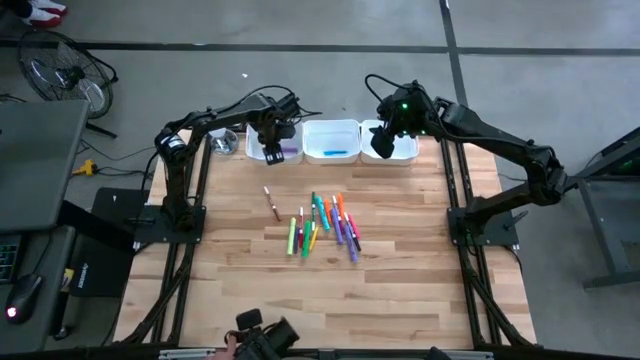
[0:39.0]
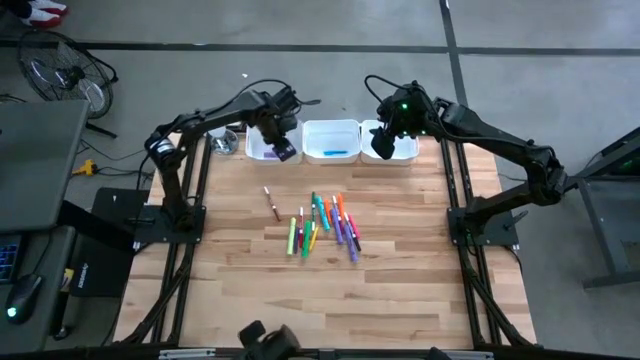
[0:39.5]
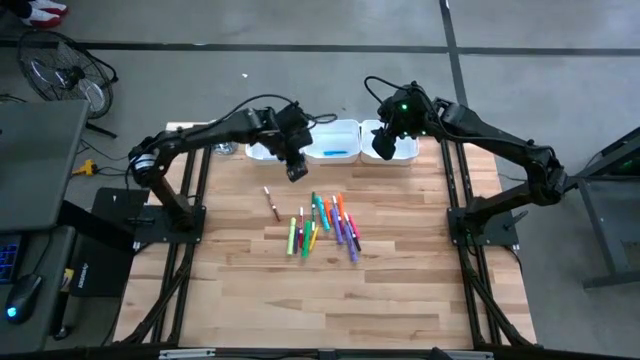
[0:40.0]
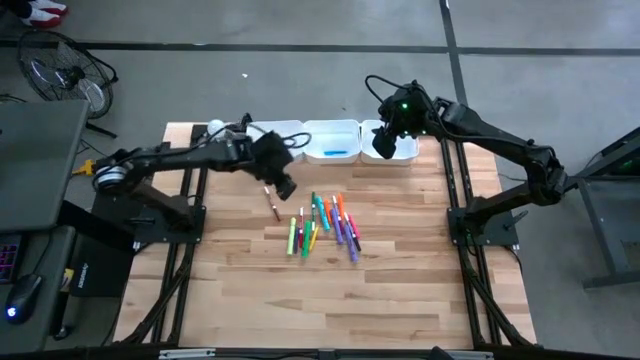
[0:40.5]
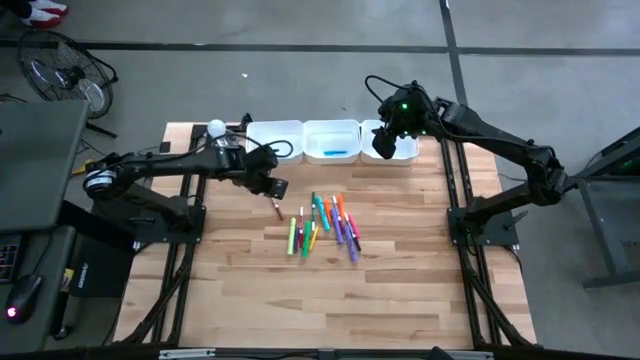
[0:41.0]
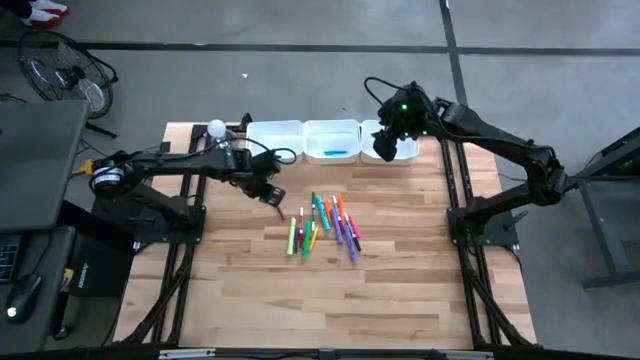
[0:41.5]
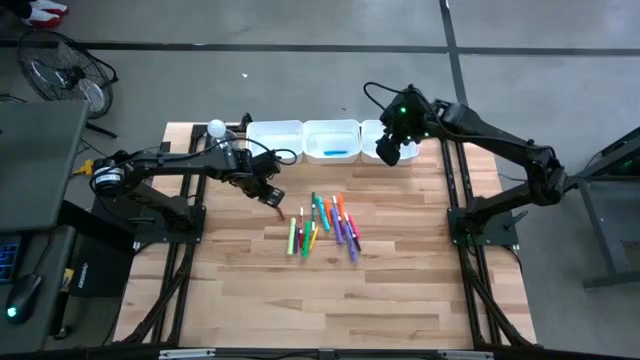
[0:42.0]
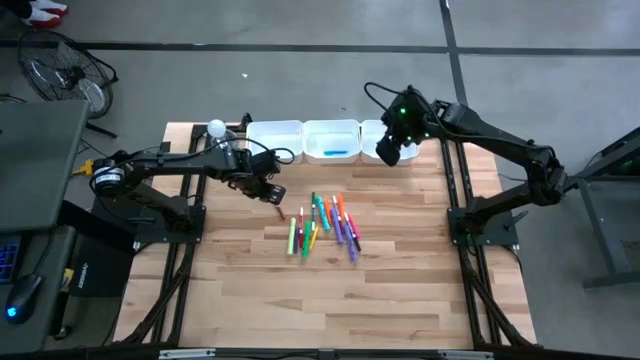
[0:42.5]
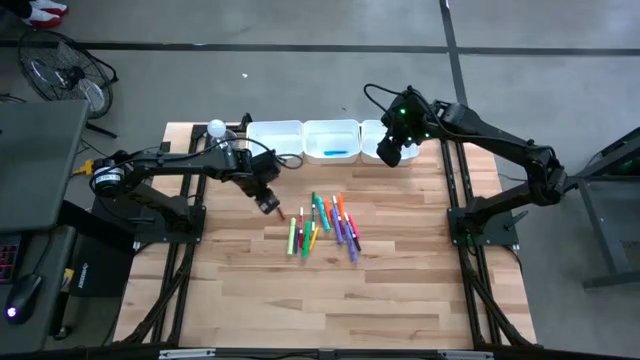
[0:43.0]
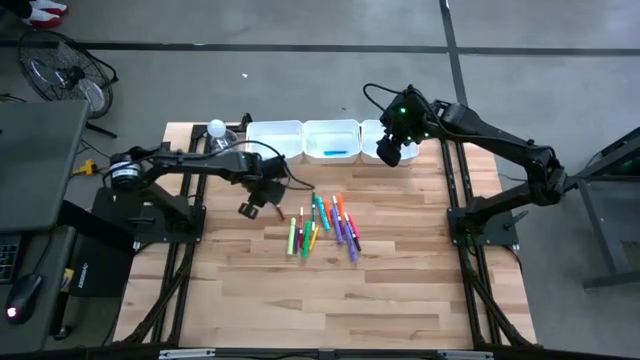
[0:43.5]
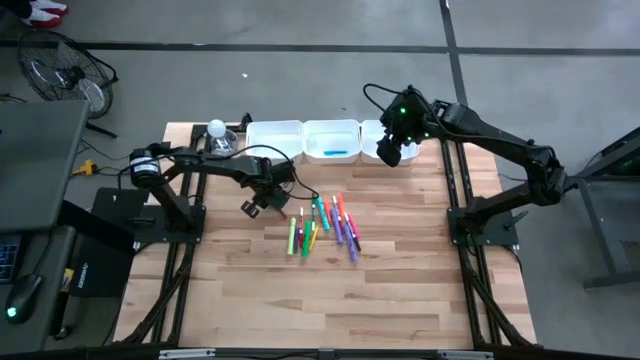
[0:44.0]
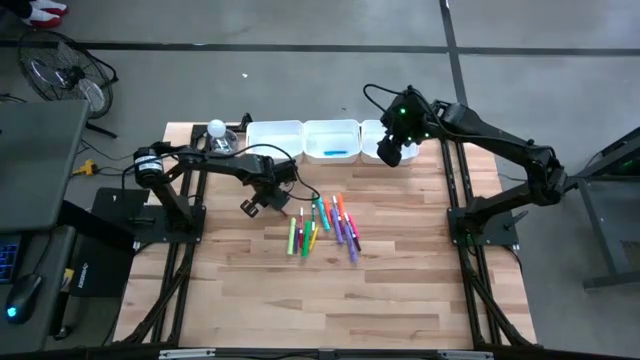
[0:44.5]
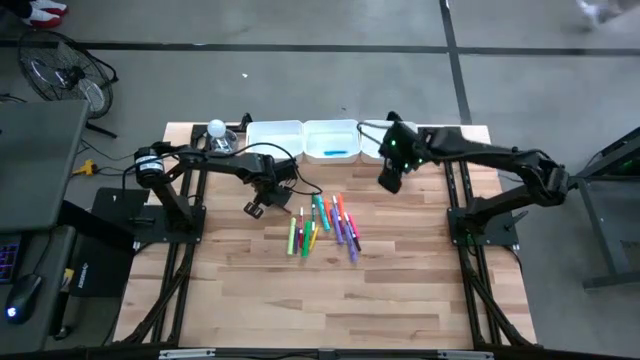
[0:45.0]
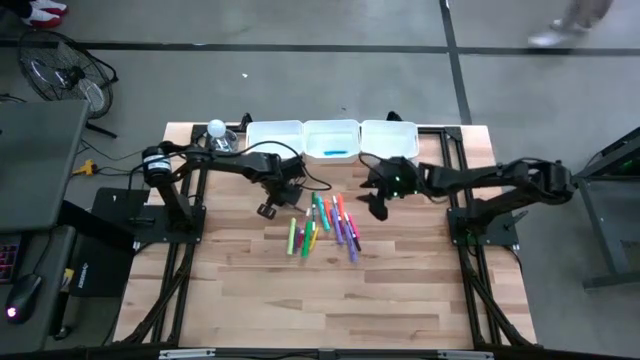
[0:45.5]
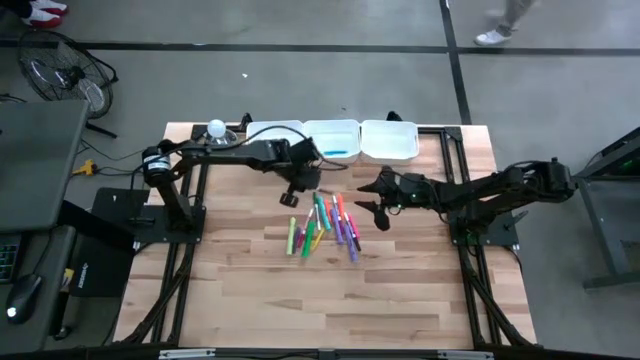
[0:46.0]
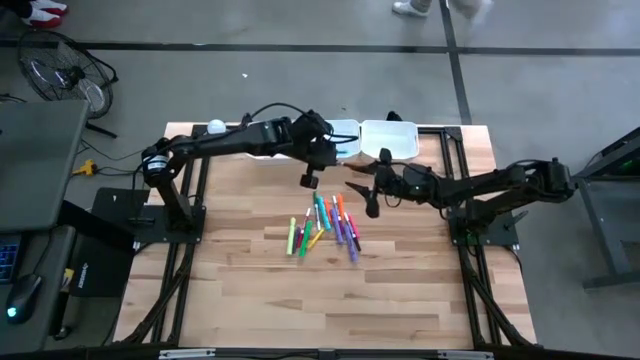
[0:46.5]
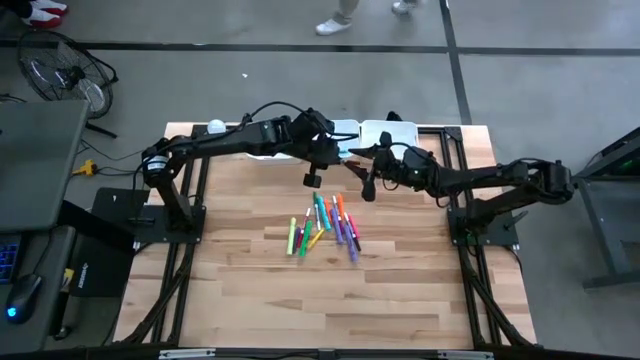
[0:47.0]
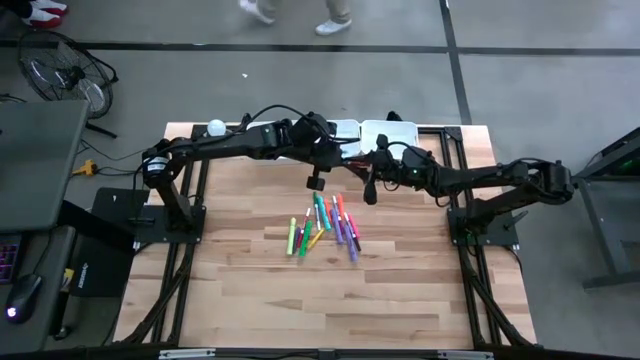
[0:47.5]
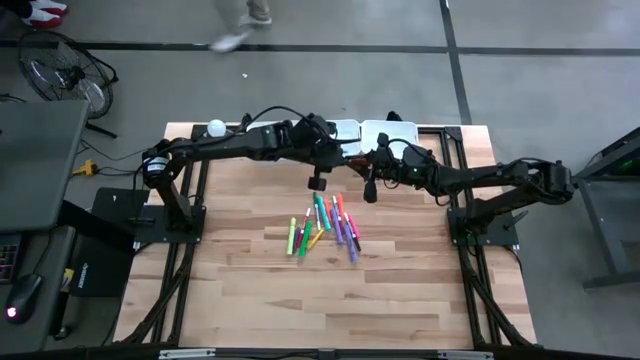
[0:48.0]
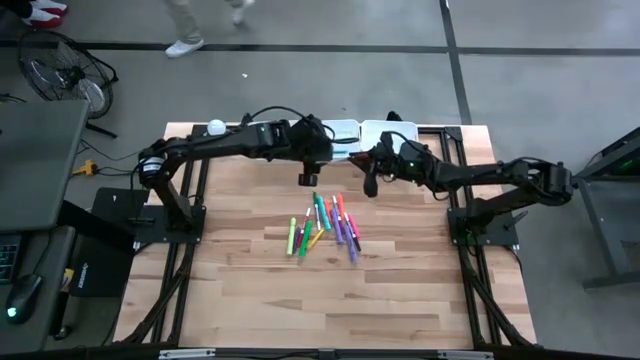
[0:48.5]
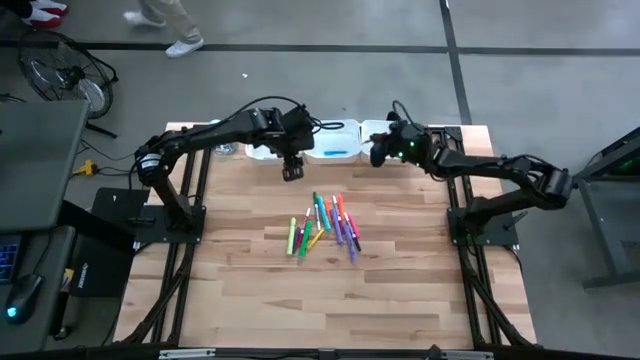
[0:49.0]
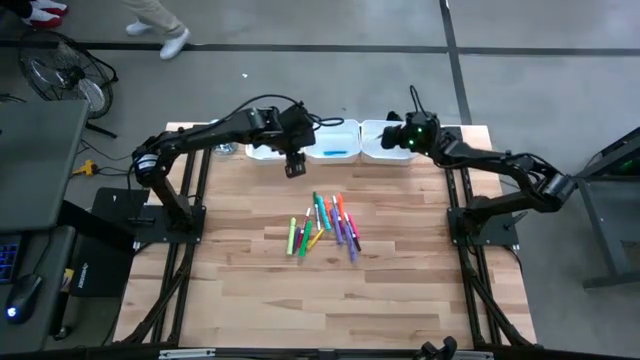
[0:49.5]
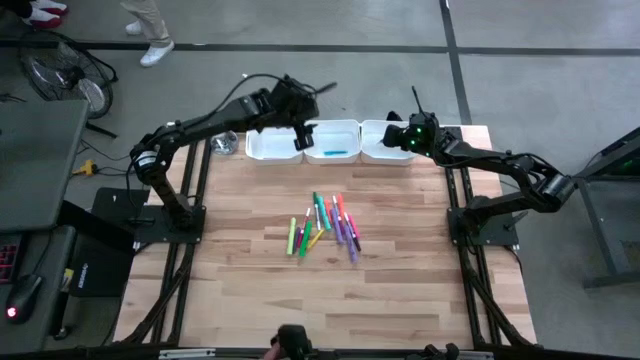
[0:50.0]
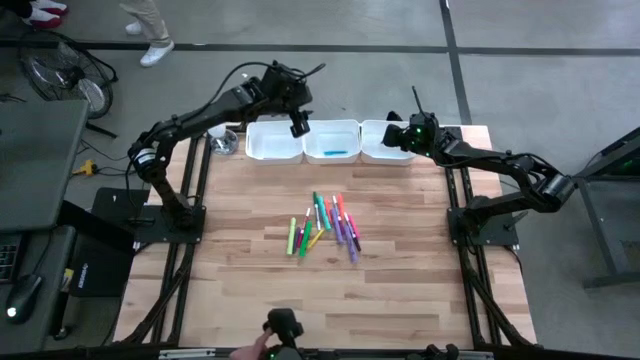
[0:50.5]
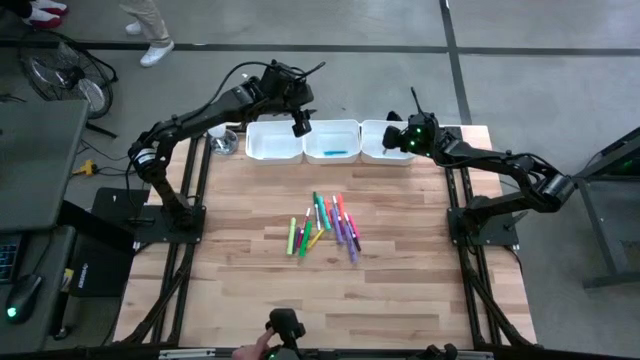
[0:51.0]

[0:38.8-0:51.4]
Task: Pick & Place Markers
Put the brown marker pen into the right white bin

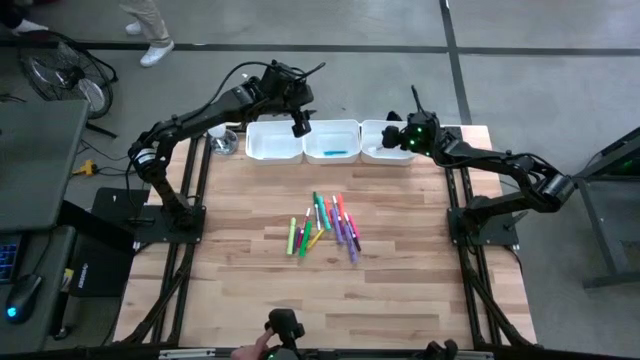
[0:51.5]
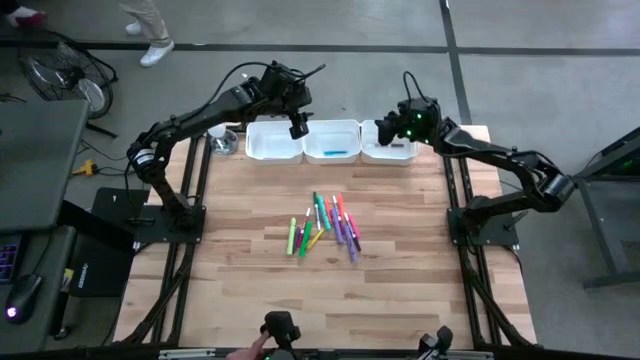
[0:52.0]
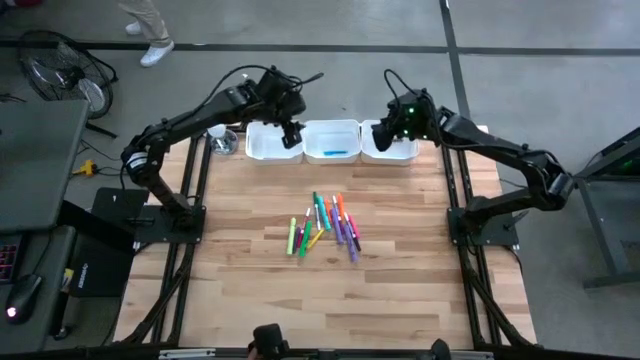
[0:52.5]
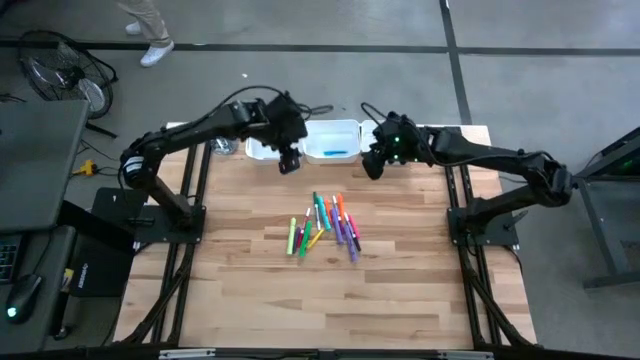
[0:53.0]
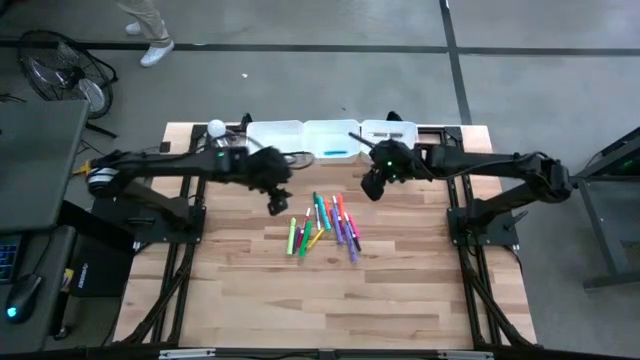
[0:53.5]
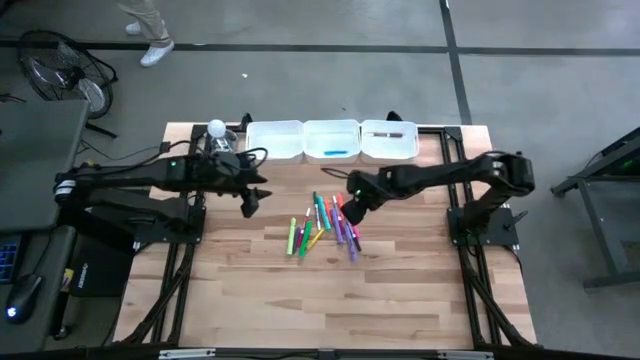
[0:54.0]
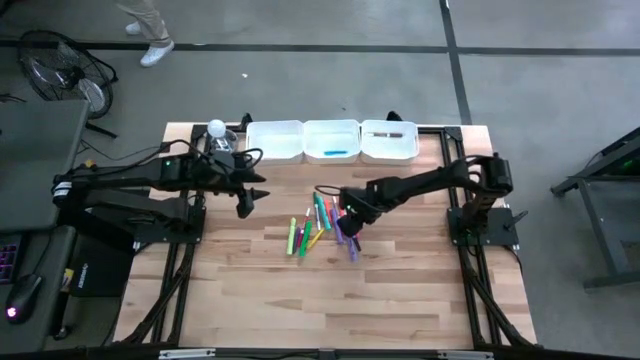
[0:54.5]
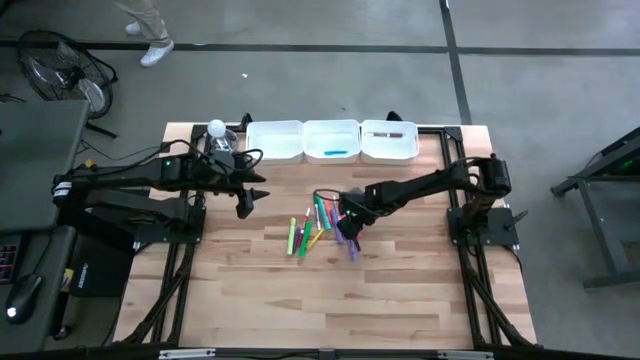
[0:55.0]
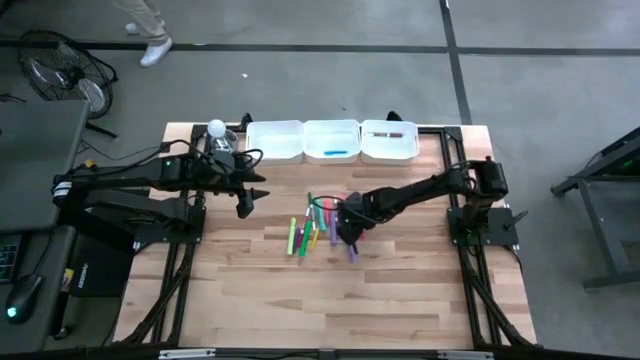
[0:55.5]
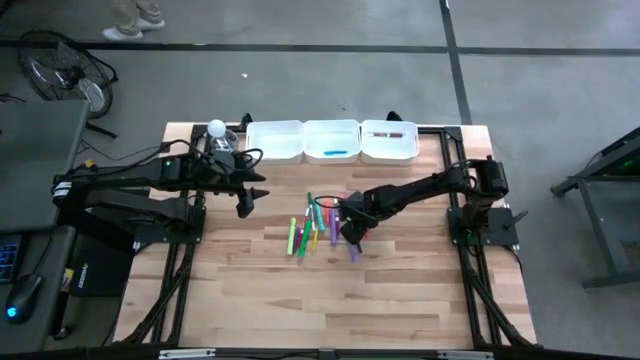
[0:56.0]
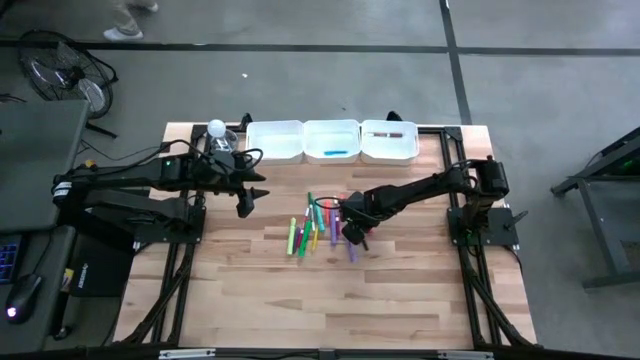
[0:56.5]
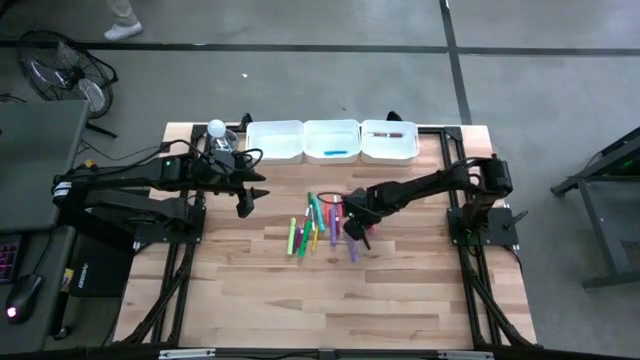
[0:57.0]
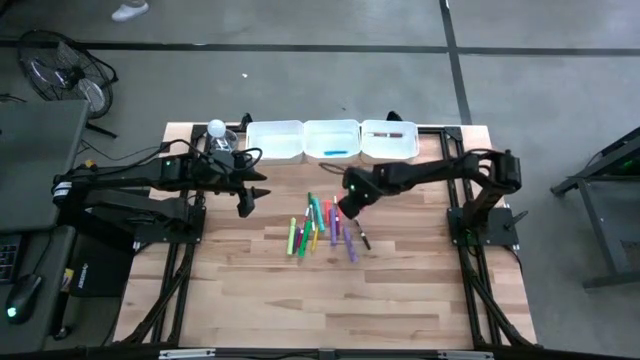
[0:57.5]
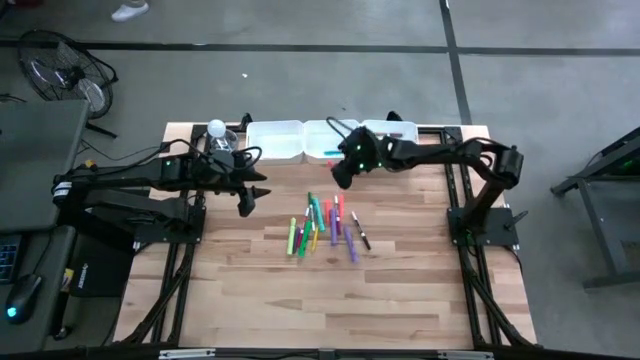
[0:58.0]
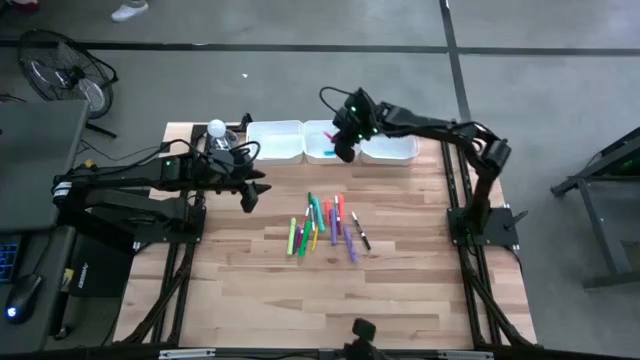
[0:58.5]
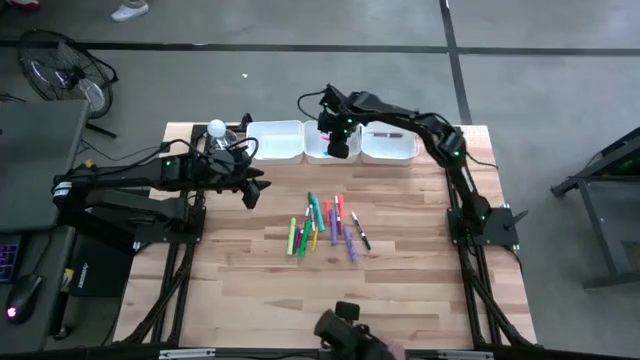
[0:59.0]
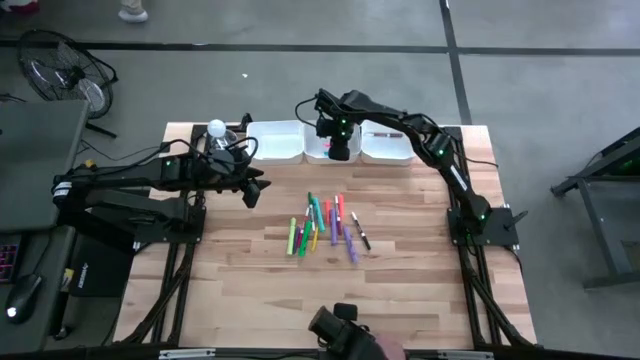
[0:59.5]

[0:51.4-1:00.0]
Put the pink pen into the middle white bin
